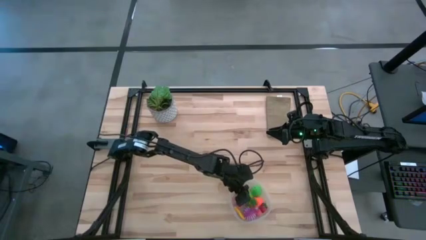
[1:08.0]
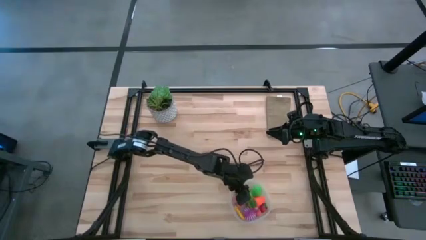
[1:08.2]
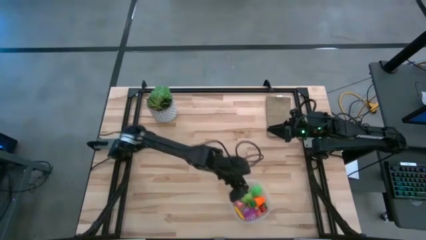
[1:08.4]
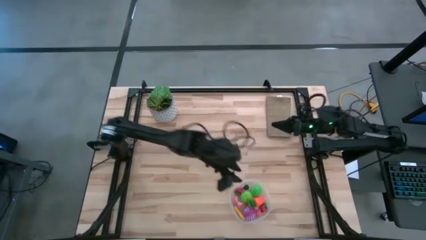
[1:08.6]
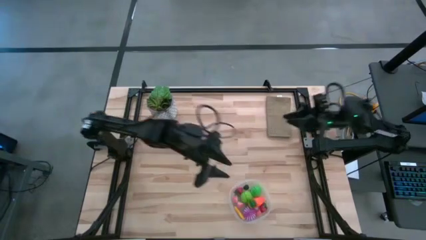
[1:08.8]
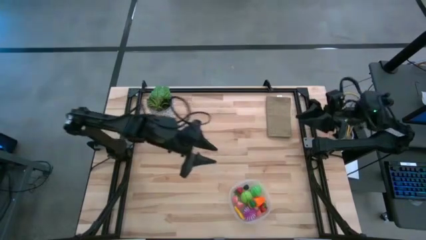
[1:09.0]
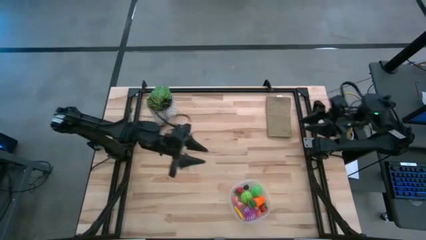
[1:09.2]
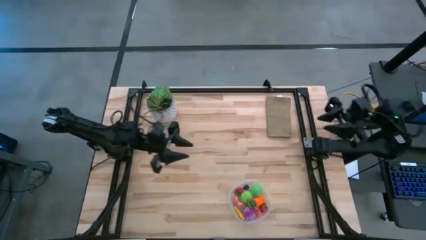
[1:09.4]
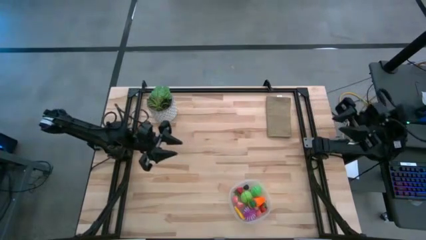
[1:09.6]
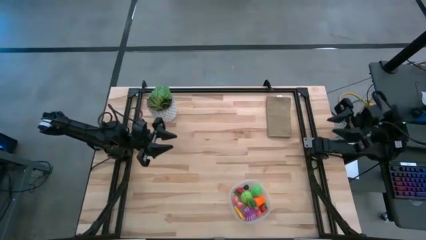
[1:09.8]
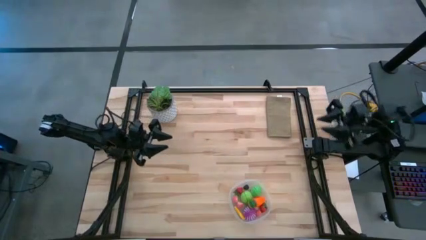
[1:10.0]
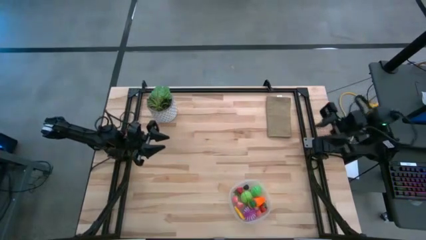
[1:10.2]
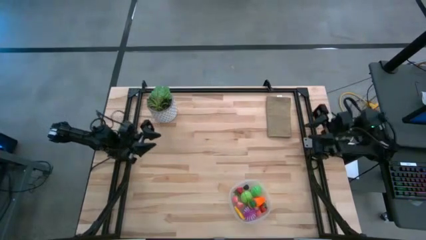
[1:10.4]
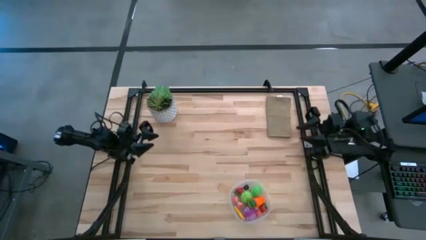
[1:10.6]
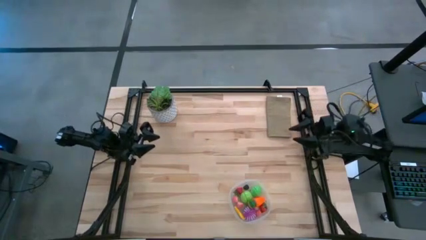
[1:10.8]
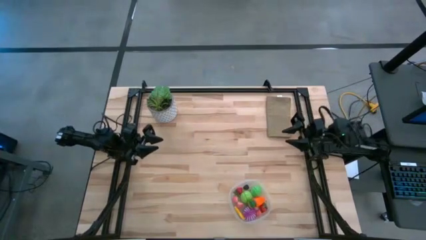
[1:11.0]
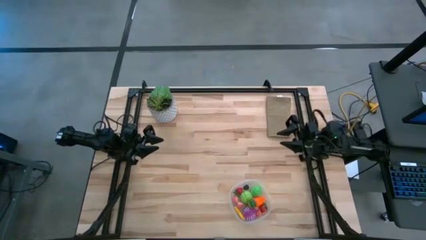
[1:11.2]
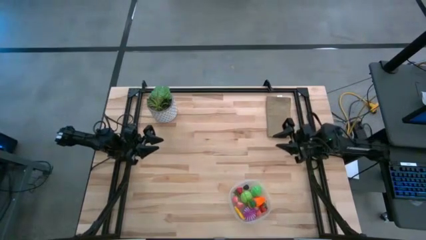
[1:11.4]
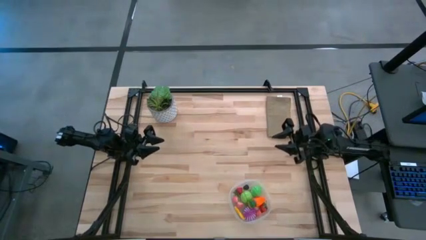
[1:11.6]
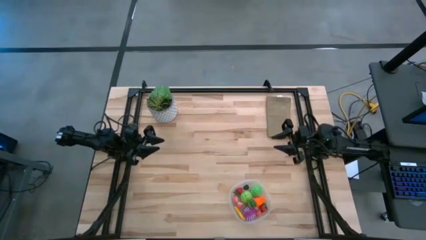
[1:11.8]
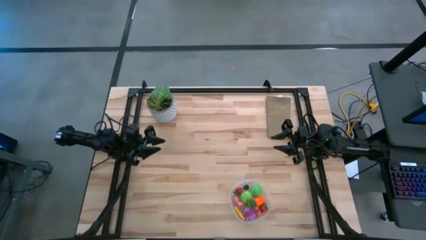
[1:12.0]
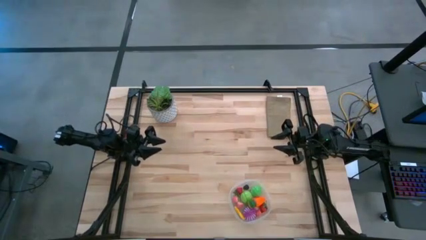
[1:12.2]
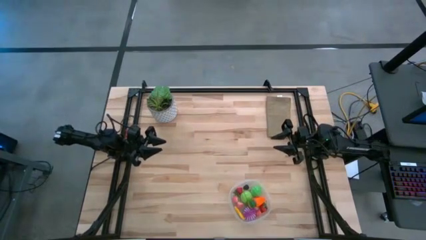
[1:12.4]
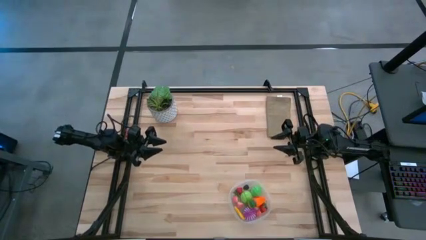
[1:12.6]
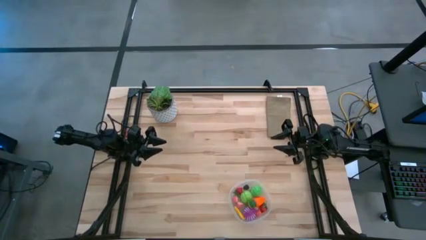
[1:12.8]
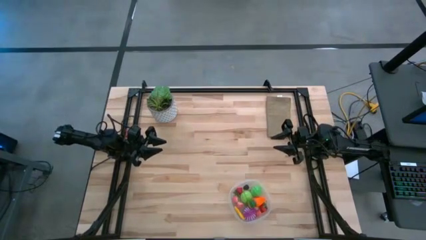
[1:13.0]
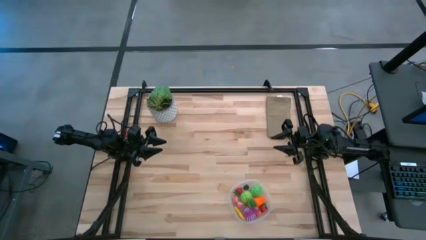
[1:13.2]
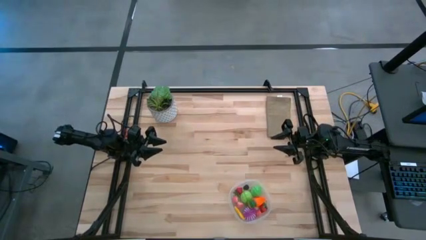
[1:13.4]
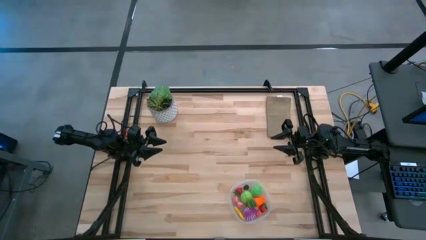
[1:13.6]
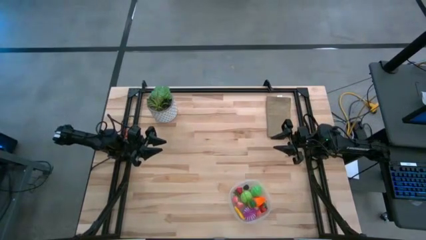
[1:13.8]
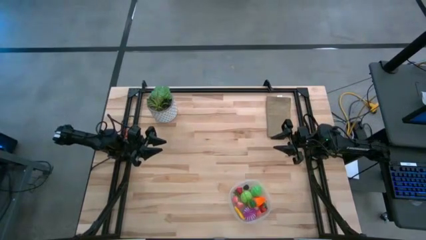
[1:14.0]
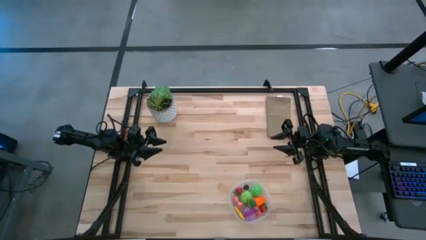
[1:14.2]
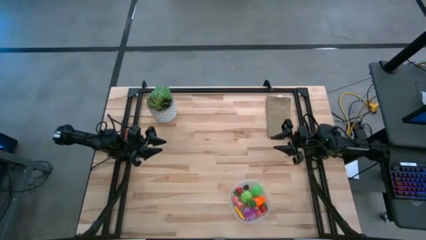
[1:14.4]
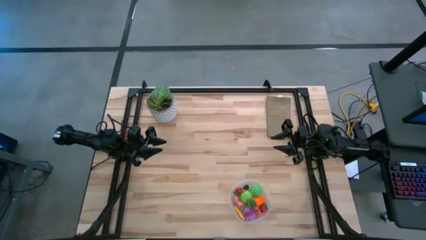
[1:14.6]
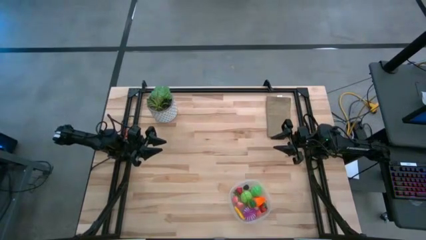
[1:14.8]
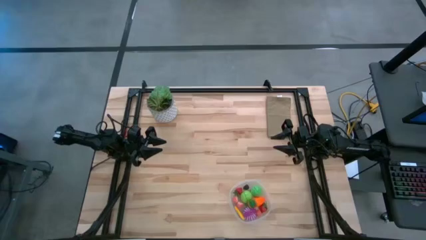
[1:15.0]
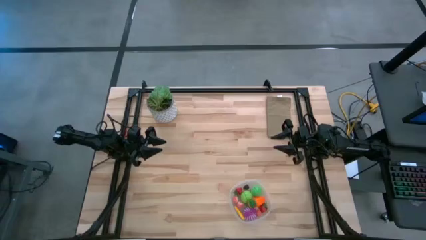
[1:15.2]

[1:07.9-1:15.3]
Task: Pick and placing Produce into tupperware
Return to Home Position

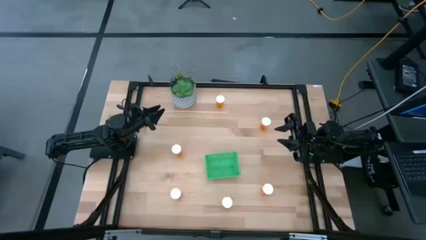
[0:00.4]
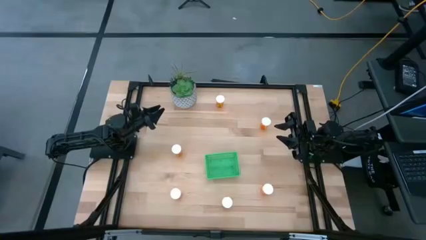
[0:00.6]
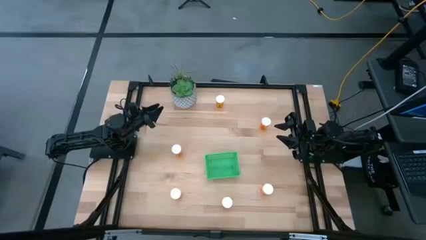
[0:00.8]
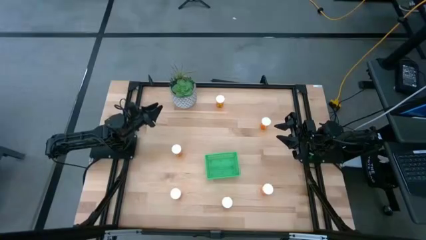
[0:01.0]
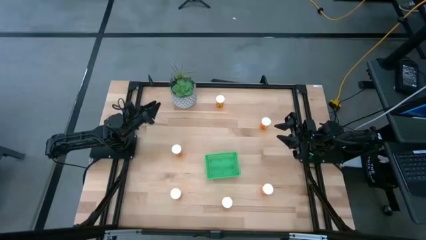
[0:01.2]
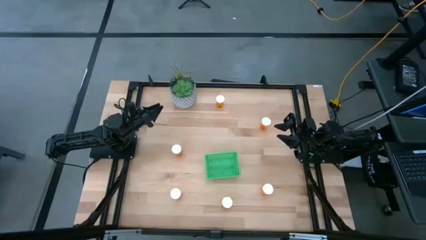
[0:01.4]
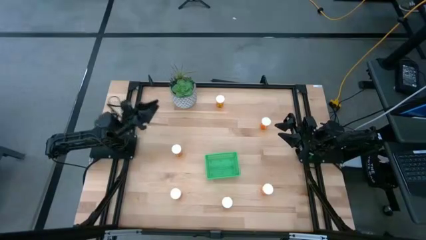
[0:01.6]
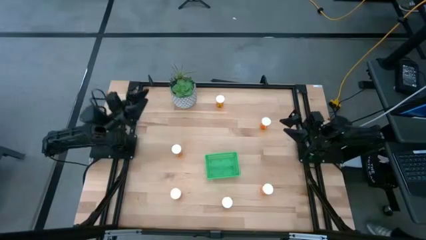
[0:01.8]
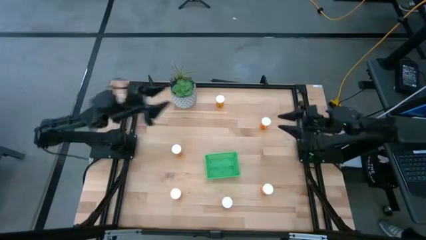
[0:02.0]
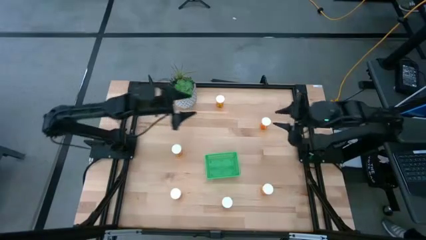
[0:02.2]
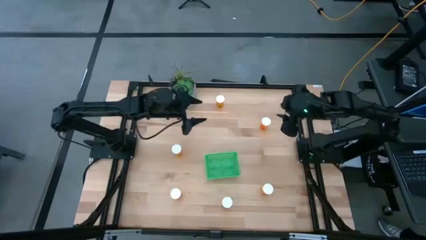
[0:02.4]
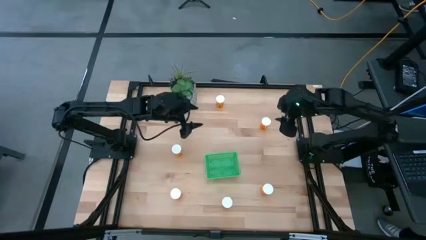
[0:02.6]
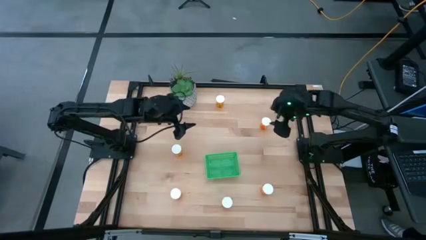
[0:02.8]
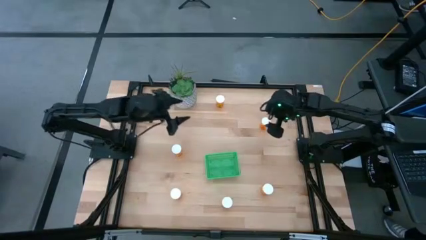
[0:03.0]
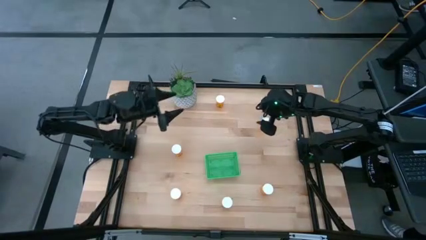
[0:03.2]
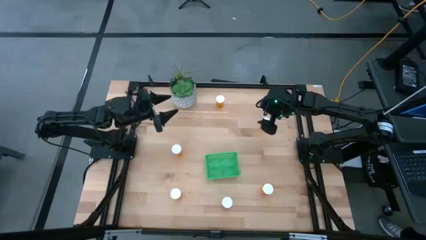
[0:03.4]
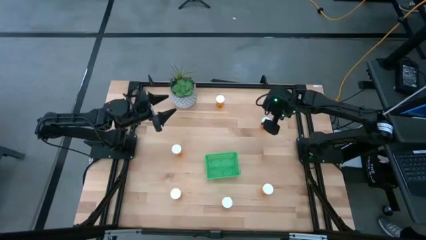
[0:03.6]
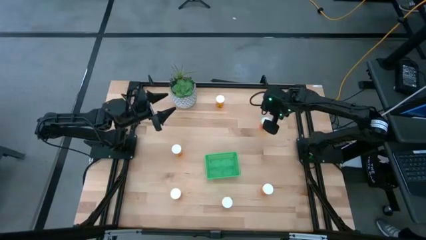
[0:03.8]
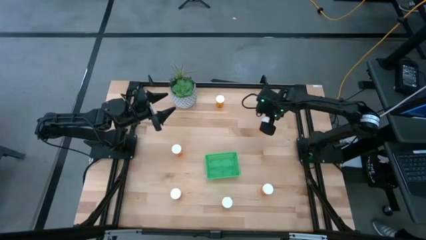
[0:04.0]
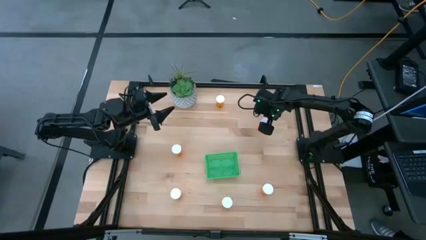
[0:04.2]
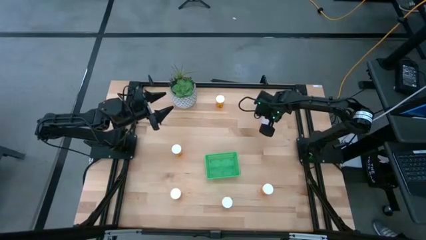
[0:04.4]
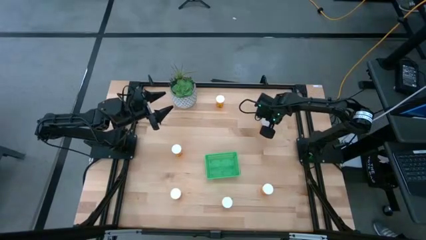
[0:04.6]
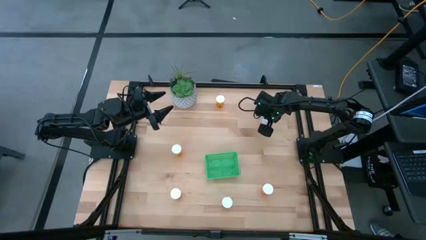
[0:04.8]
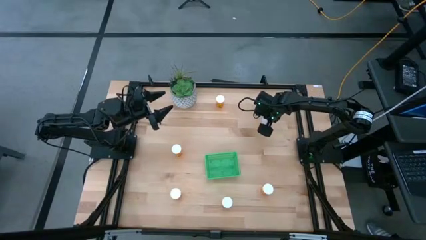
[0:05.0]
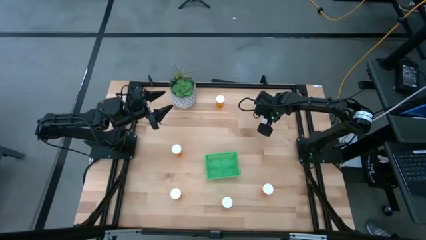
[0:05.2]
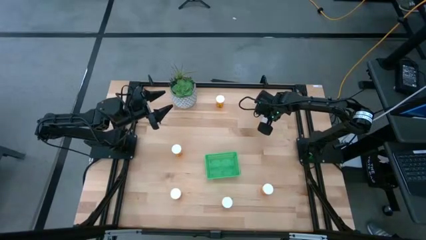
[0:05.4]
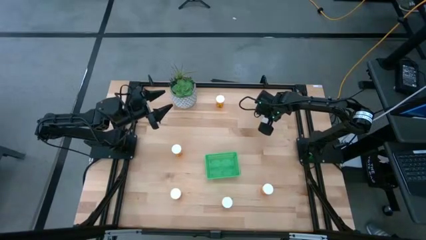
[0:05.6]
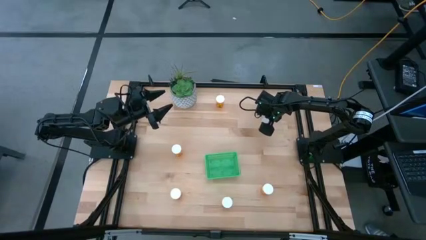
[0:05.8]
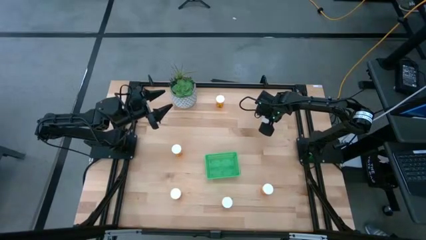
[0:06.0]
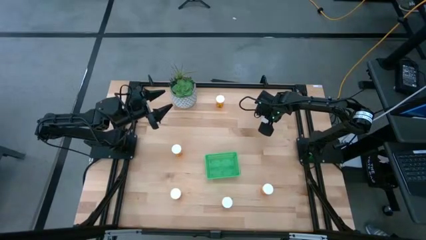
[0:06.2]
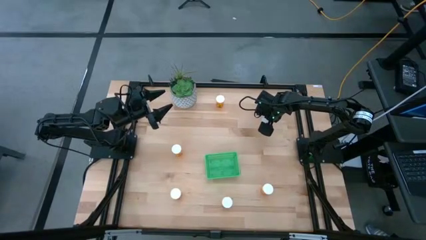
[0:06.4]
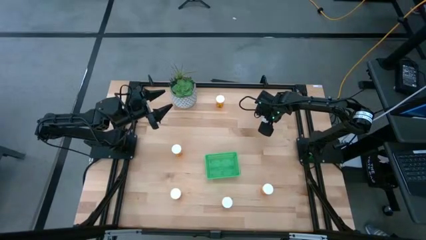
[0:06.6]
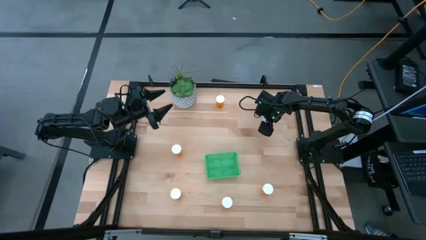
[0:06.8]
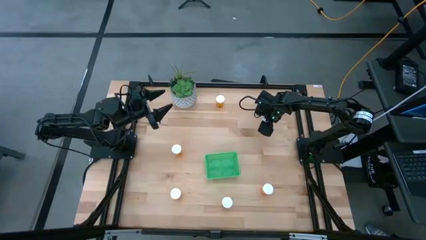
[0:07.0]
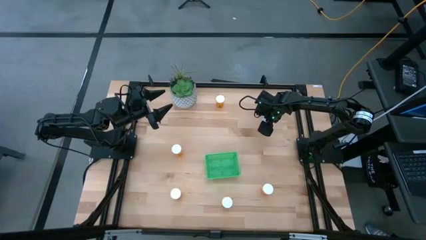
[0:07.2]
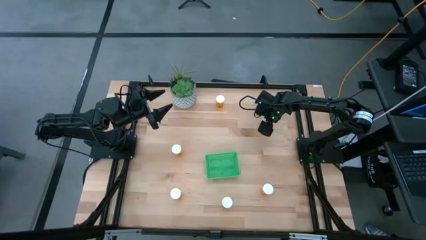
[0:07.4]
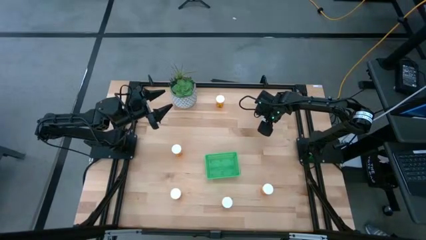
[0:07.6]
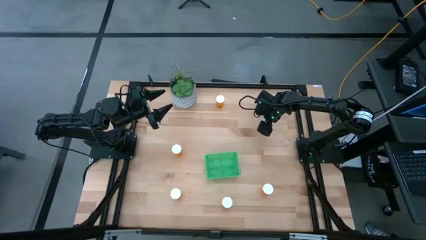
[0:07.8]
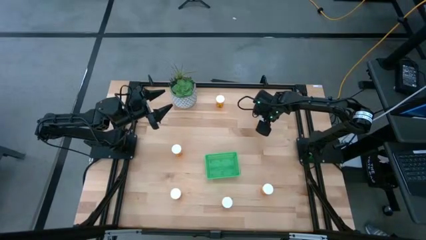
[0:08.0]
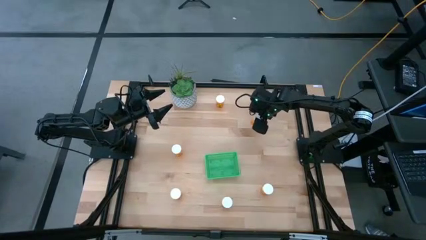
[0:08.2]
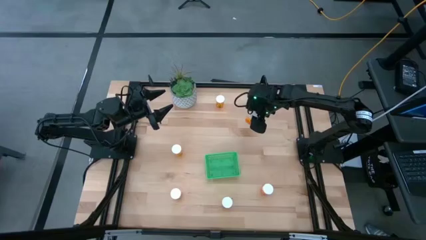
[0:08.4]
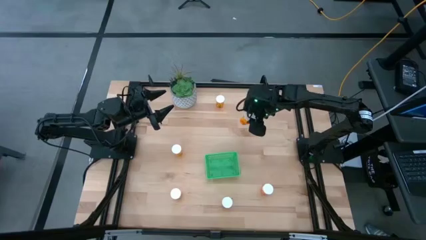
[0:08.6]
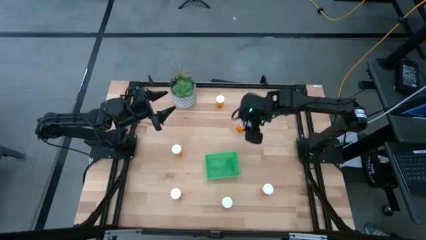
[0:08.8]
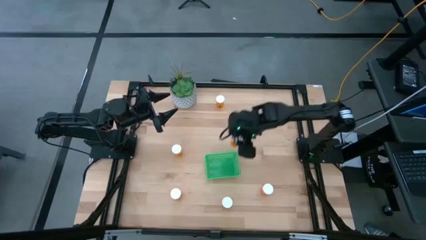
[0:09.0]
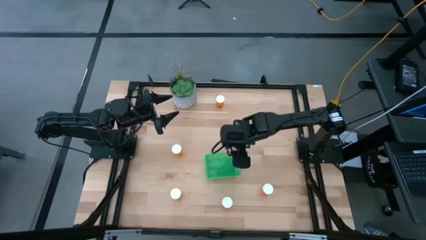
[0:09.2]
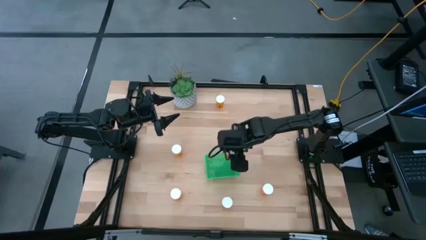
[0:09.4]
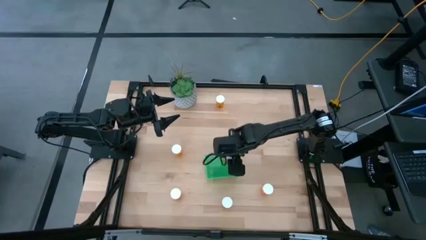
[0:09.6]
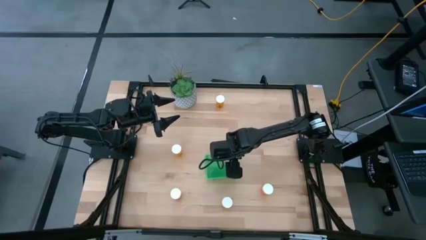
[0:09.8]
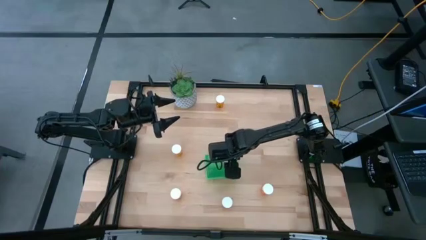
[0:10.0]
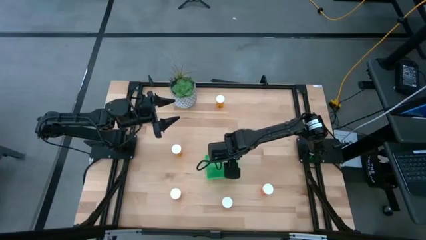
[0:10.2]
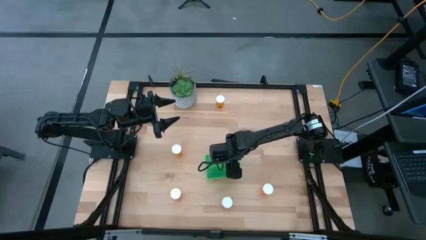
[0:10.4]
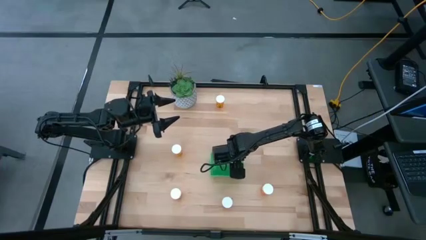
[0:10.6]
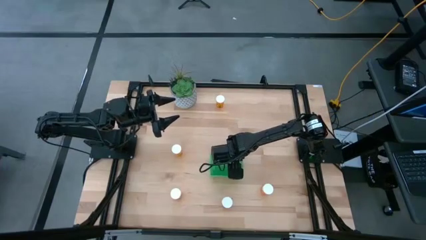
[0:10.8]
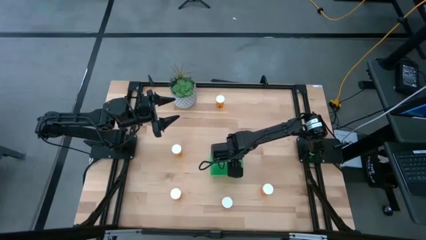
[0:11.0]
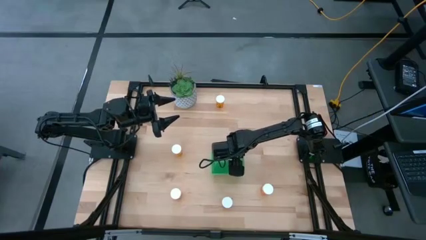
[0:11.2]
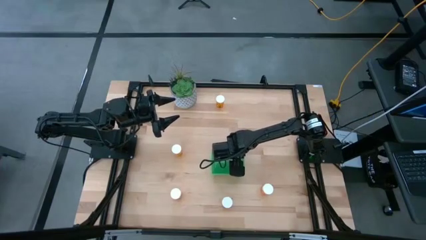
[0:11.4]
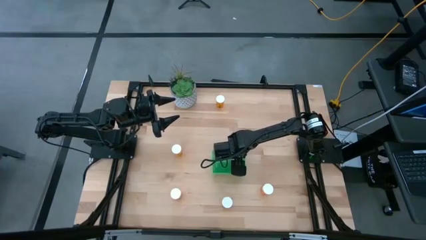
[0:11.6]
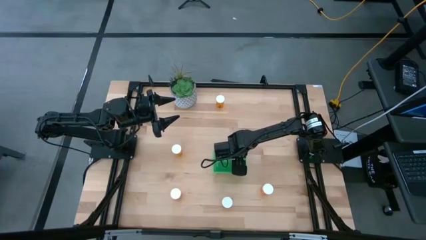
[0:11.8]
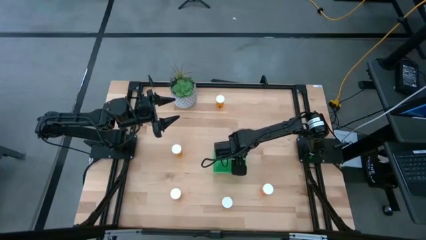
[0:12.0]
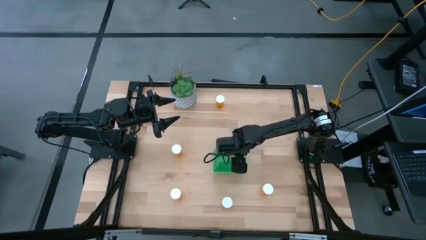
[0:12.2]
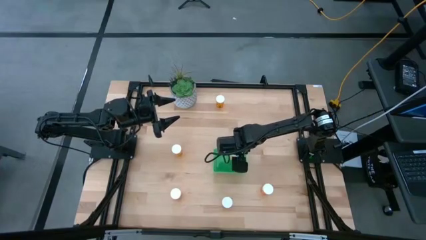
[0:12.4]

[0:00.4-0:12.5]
Task: Pick and place pill bottles into a basket
Put the orange pill bottle into the green bin
